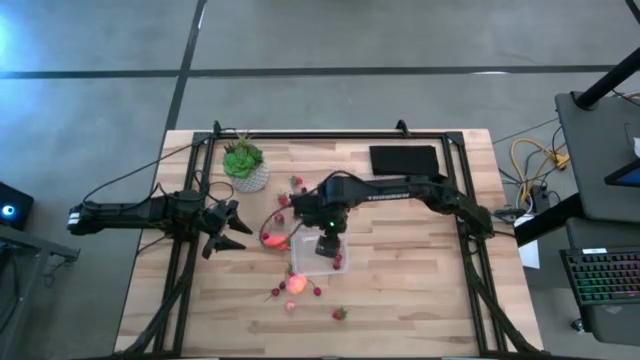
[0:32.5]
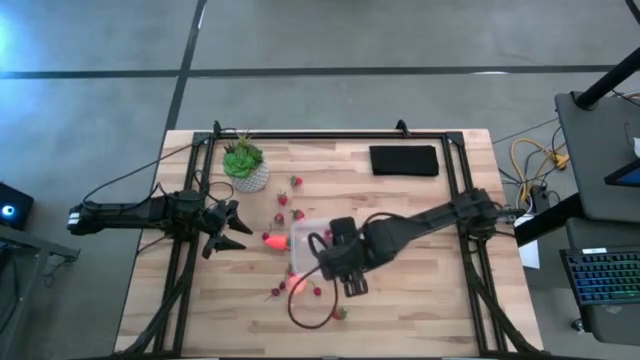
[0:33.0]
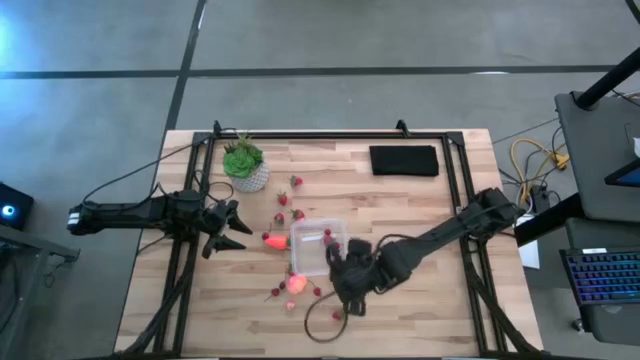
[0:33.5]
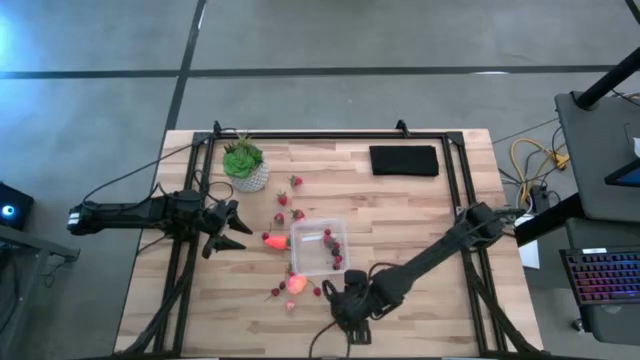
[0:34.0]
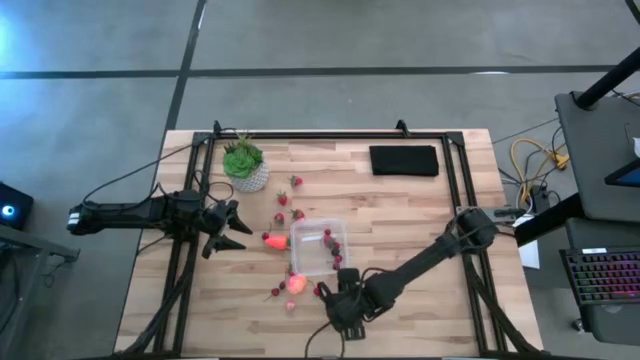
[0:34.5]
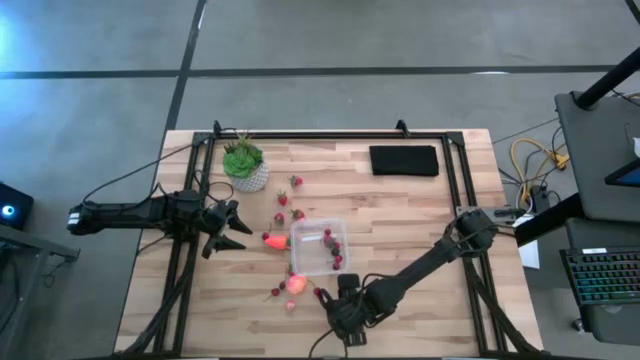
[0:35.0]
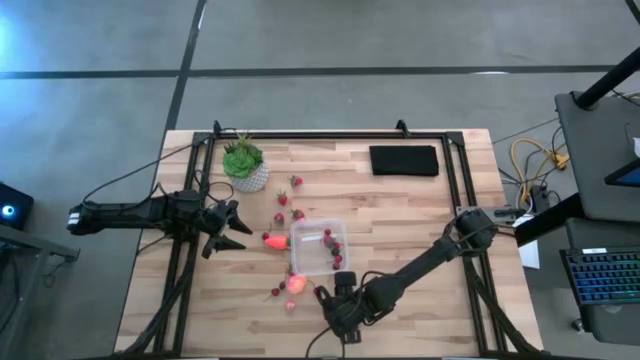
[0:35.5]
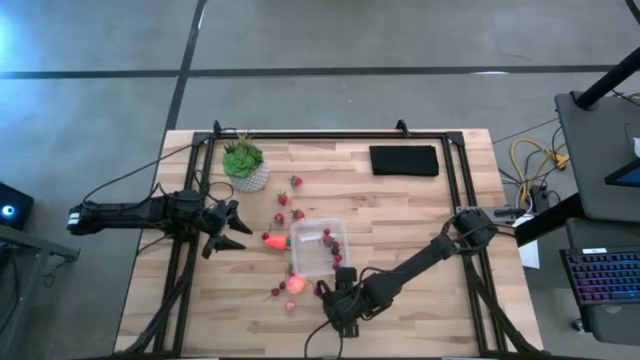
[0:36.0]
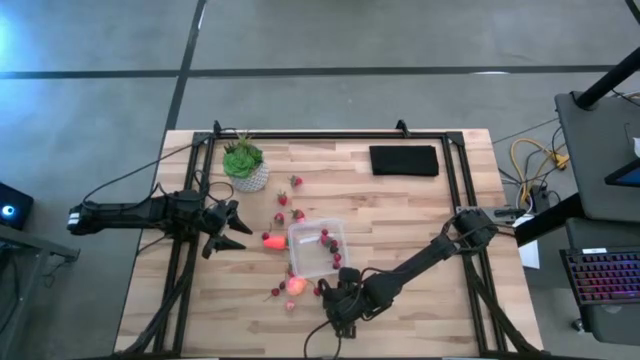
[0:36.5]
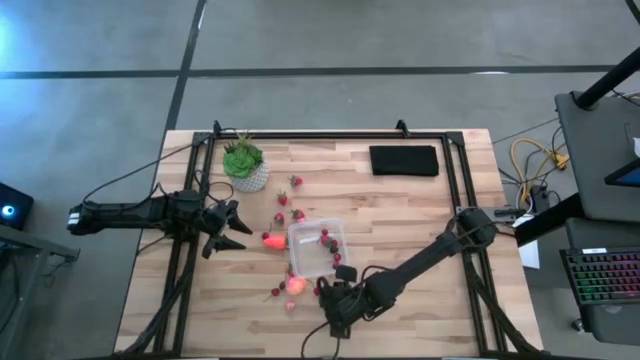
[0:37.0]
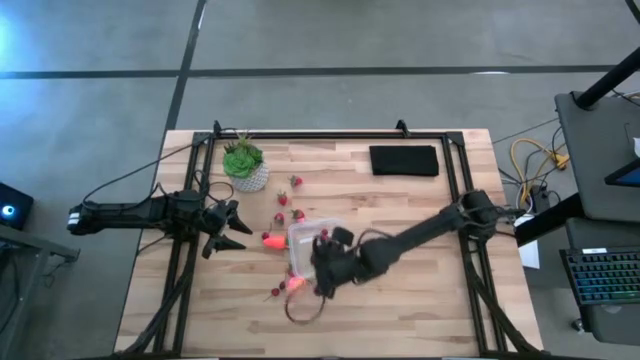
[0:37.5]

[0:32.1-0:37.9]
Task: Pick and placing Produce into tupperware
Put the strawberry into the transparent container

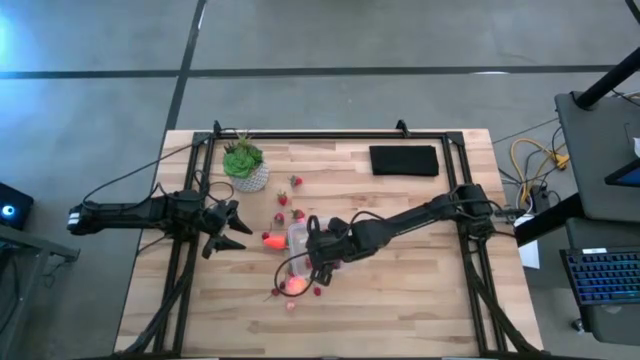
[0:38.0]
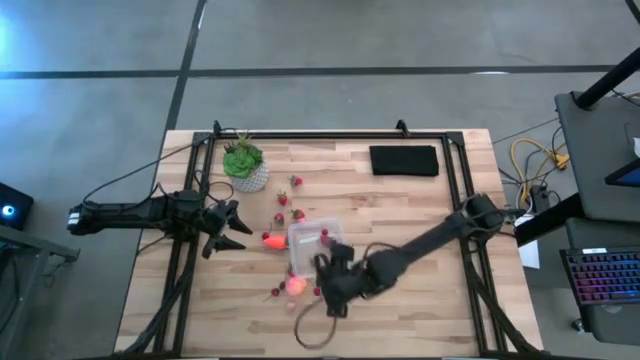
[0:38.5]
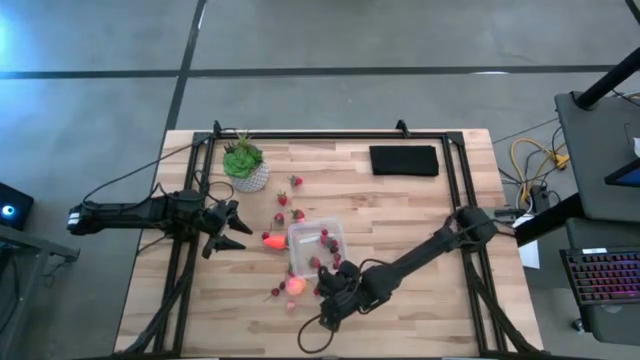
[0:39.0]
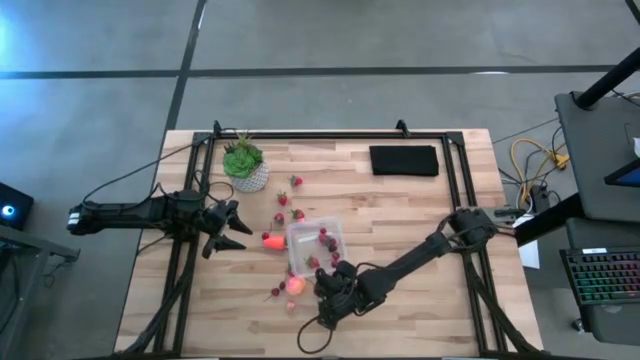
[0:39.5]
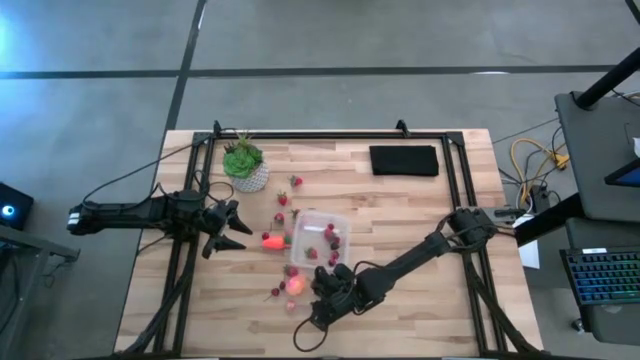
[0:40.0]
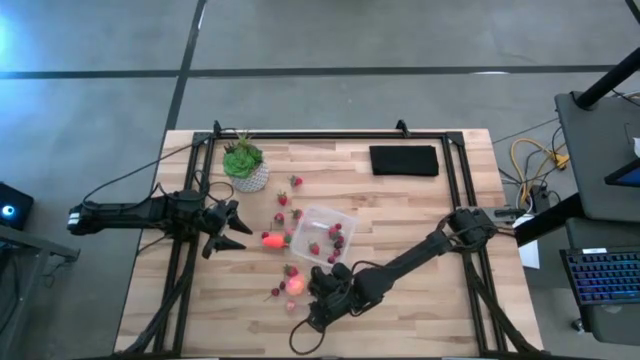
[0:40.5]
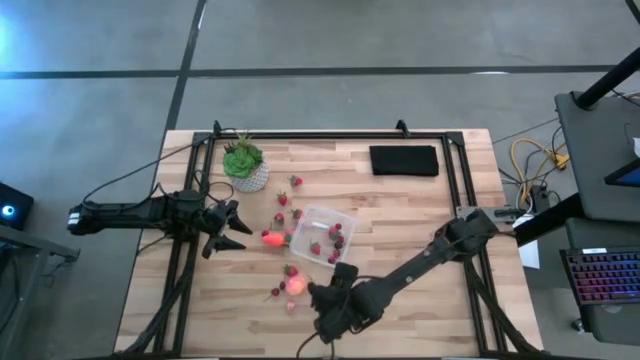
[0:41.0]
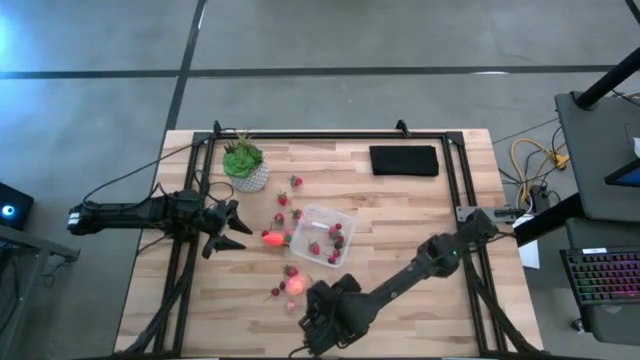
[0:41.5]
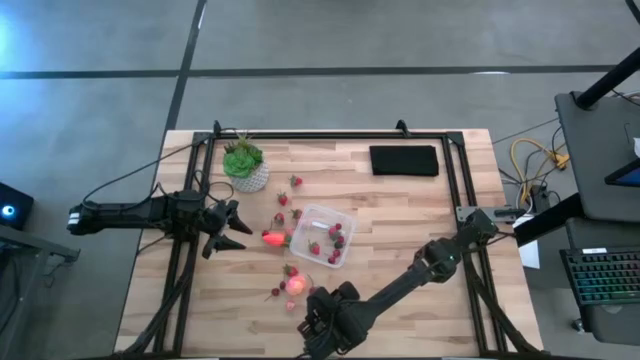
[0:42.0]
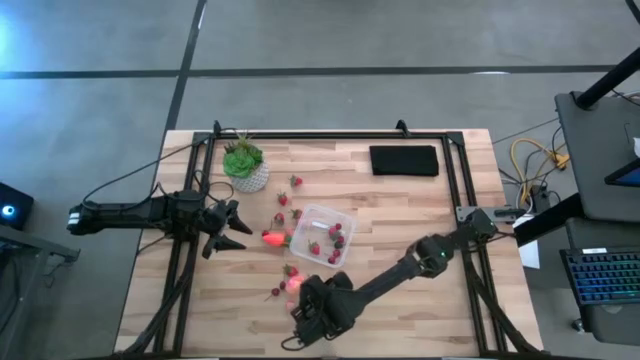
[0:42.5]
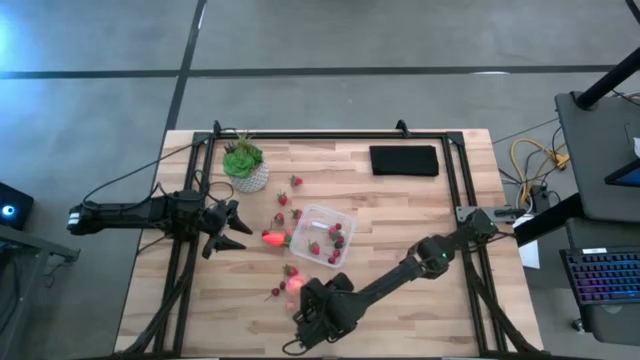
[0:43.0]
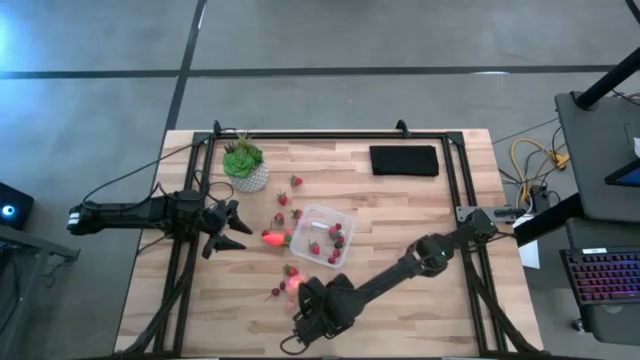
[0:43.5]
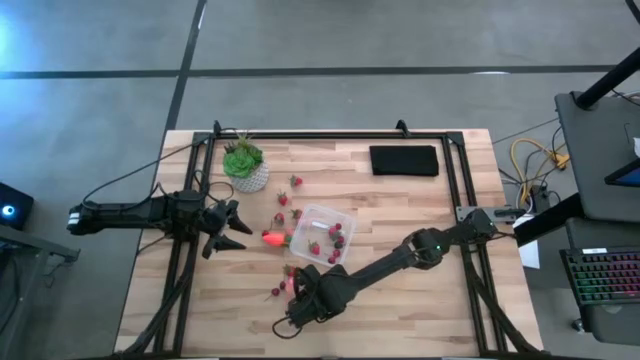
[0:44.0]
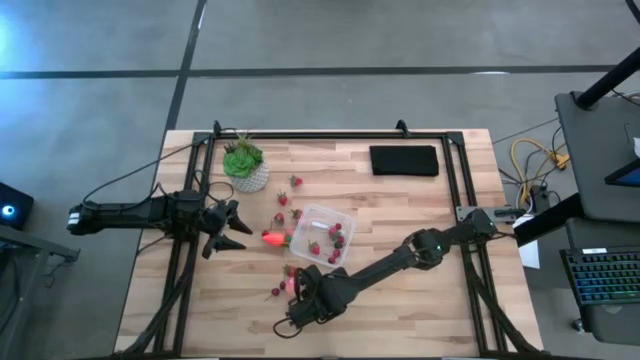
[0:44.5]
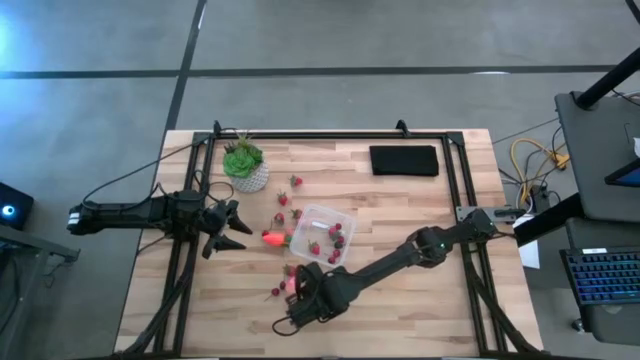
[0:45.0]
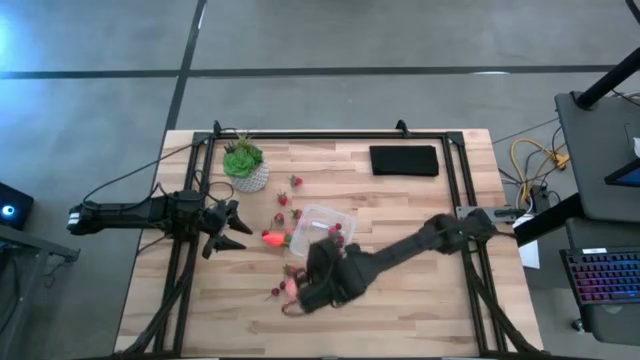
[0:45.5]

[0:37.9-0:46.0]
Put the red cherry into the transparent container

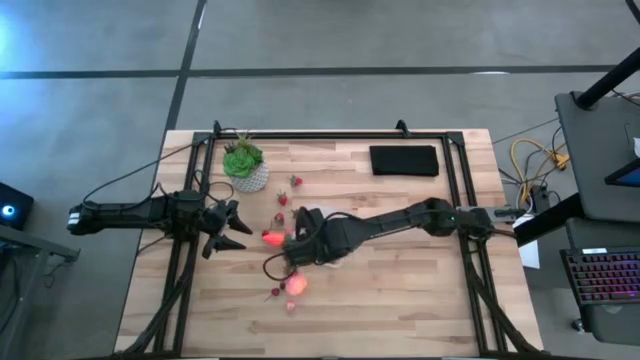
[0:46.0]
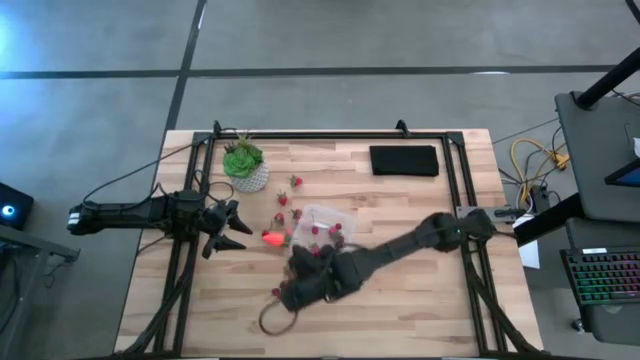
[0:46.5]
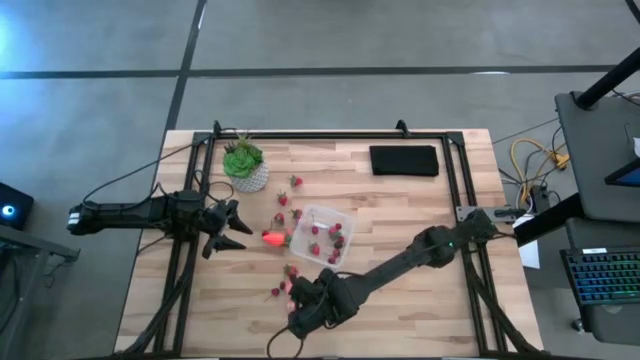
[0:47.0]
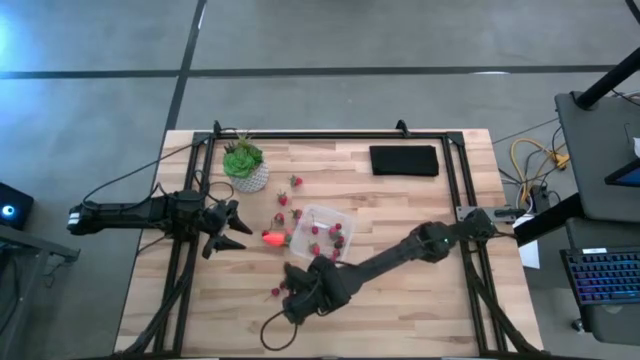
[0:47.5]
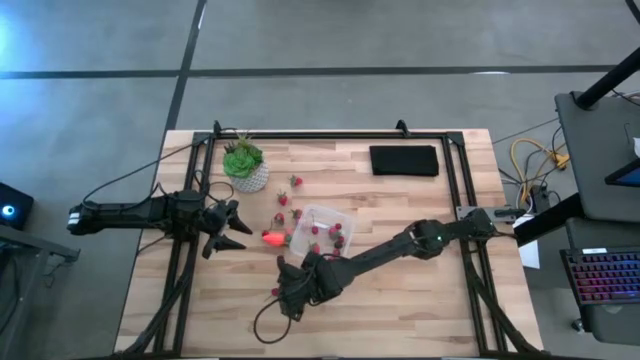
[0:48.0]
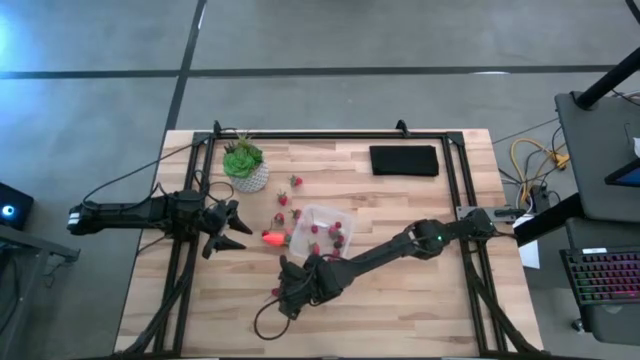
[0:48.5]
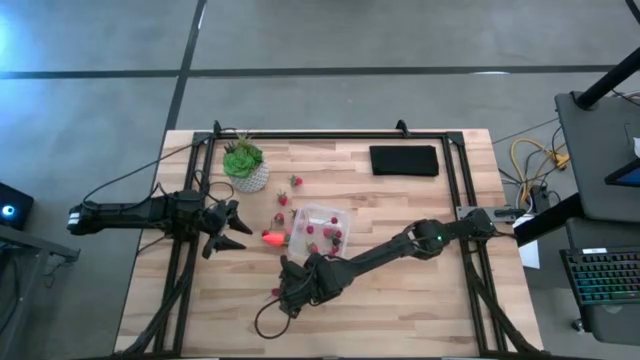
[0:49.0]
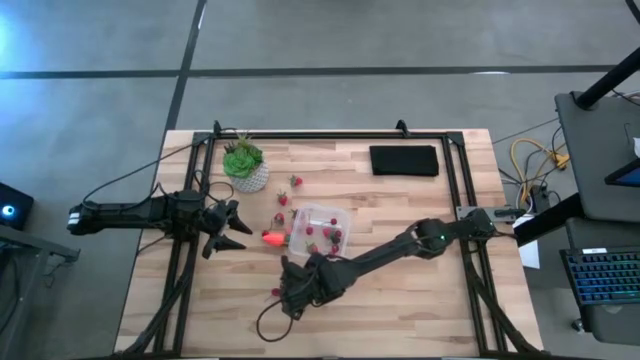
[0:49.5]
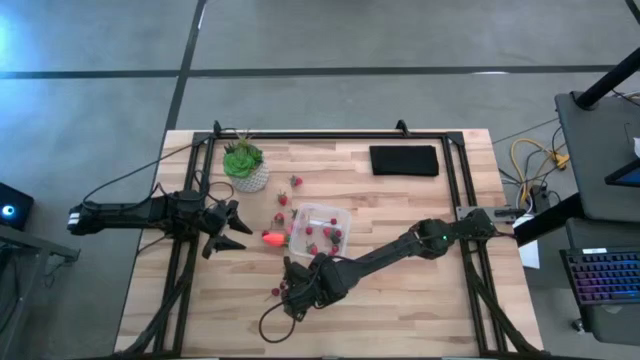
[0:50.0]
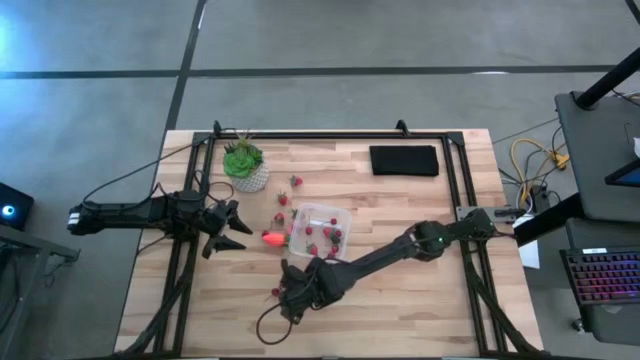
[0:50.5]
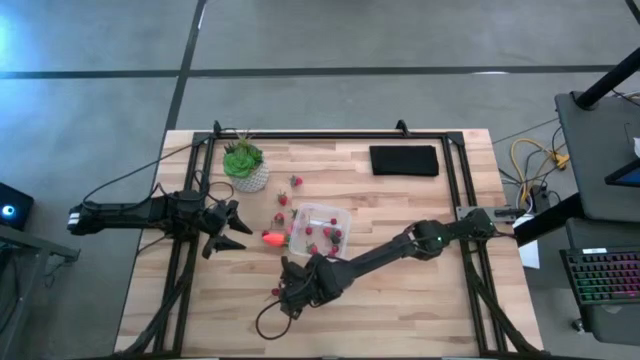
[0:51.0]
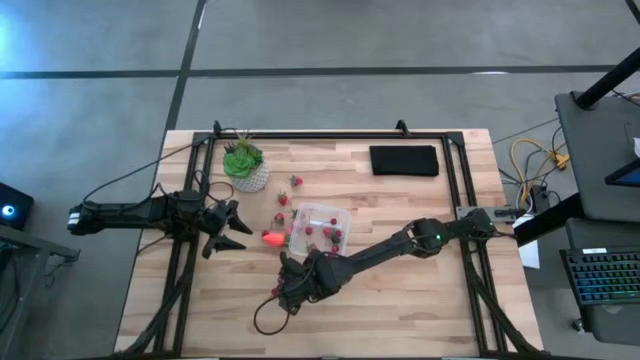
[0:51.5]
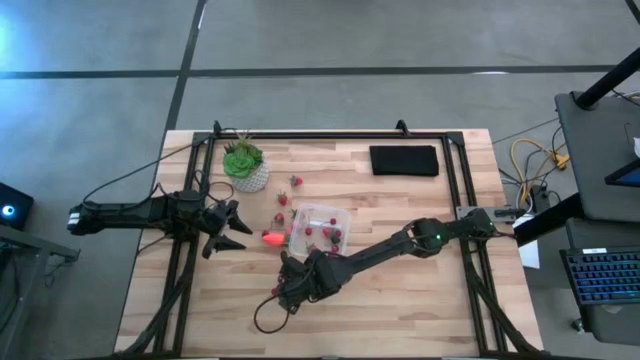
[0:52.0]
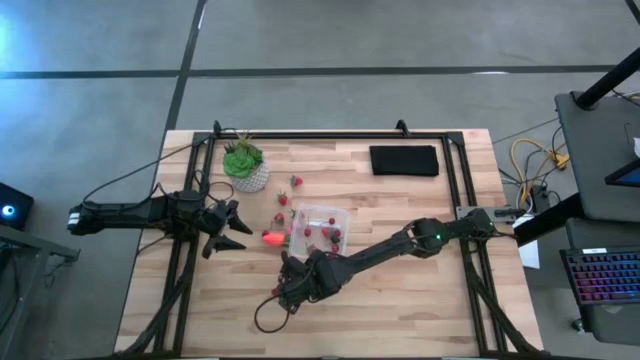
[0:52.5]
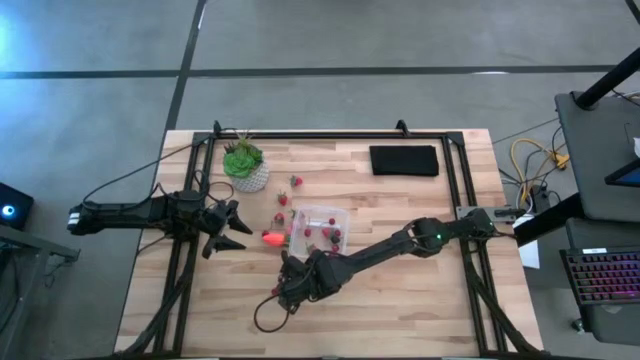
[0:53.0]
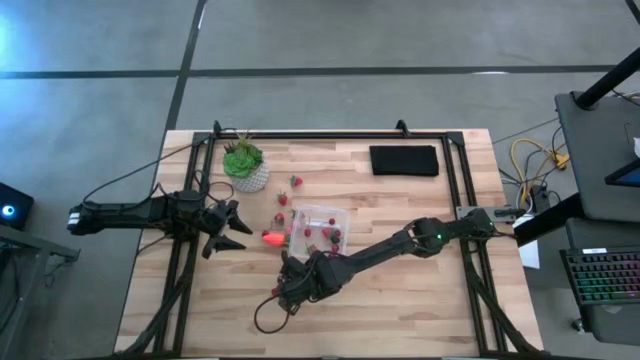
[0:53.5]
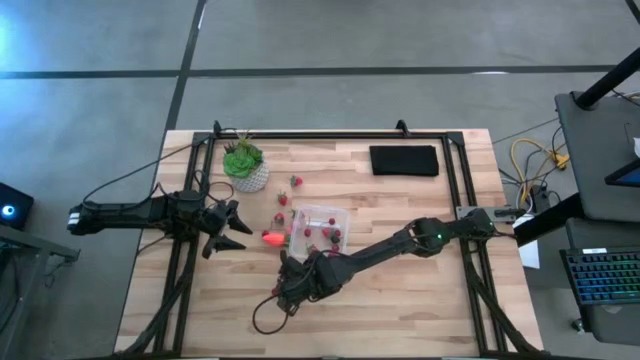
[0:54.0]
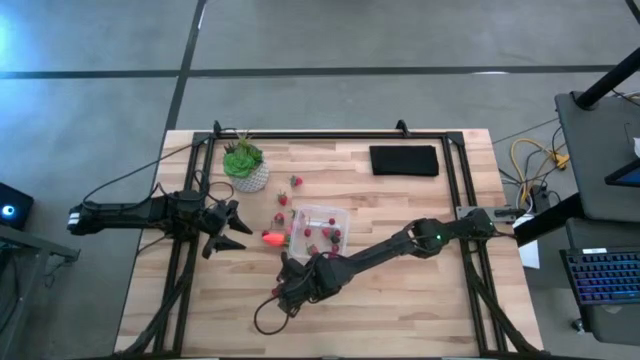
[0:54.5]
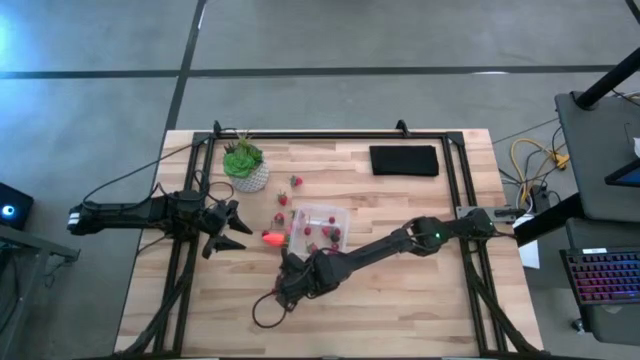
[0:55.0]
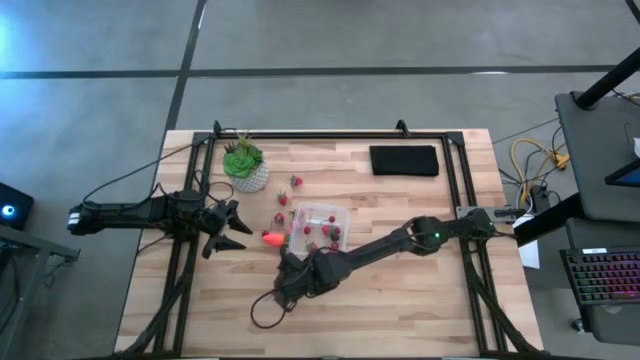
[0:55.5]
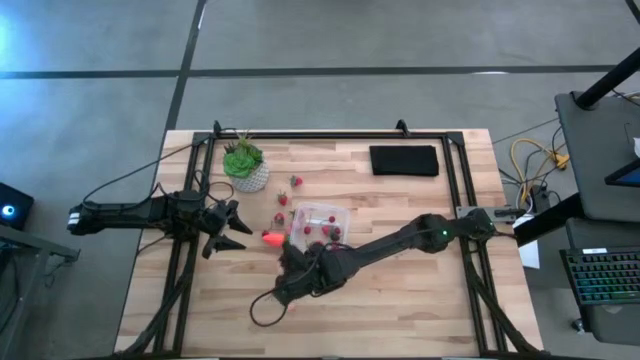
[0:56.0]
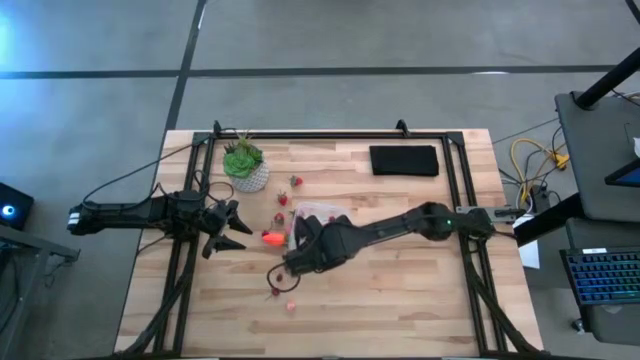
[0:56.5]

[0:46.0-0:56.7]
Put the large peach into the transparent container
